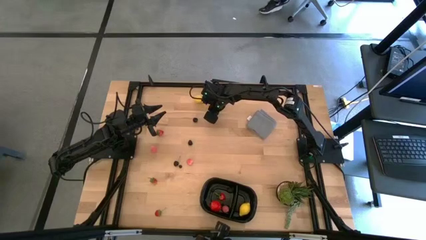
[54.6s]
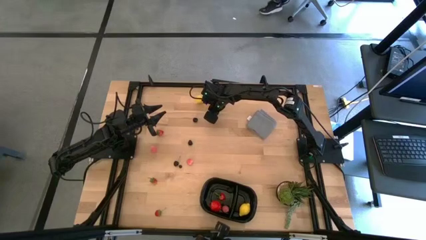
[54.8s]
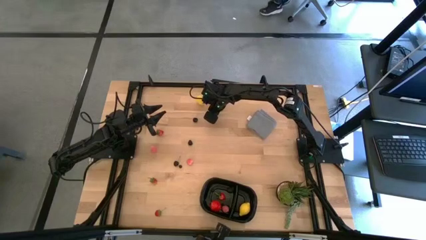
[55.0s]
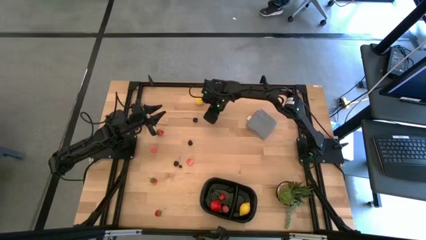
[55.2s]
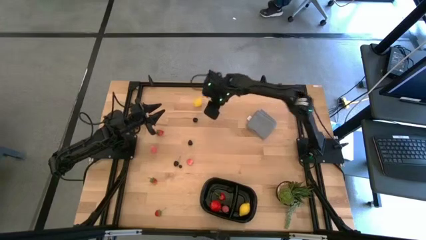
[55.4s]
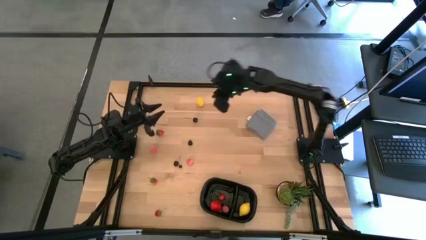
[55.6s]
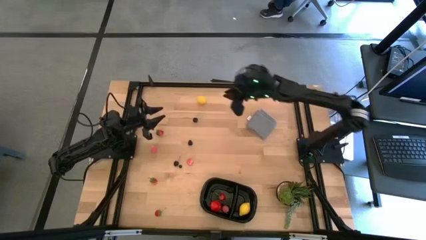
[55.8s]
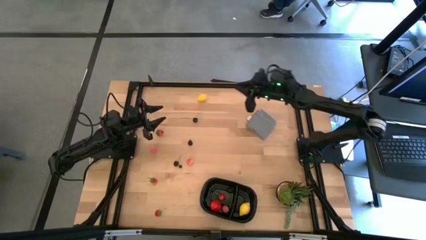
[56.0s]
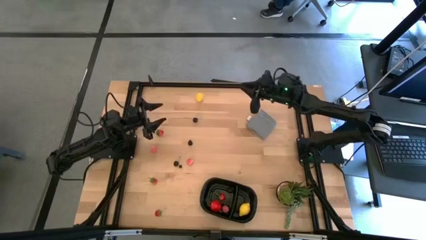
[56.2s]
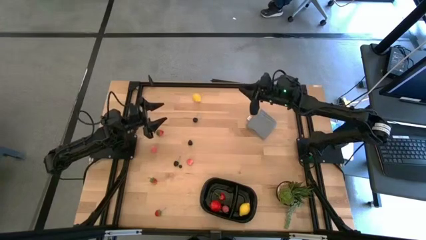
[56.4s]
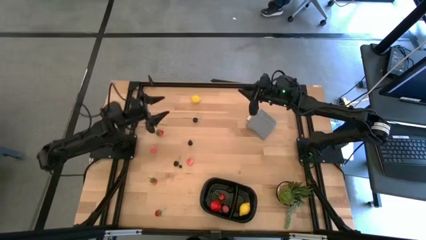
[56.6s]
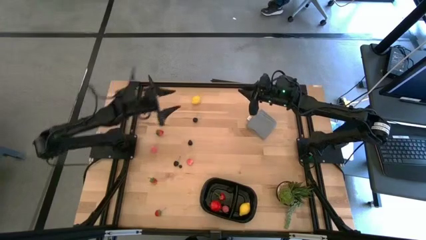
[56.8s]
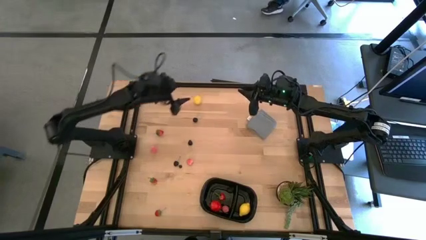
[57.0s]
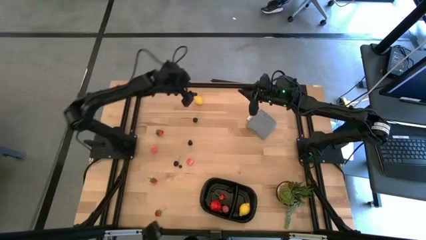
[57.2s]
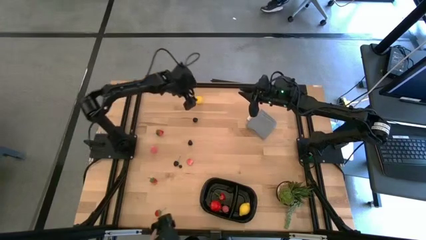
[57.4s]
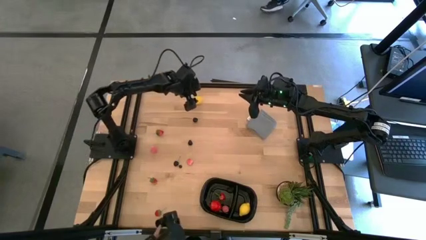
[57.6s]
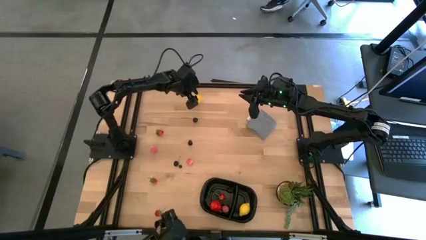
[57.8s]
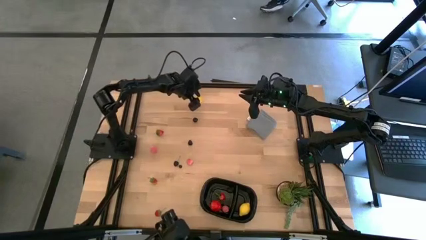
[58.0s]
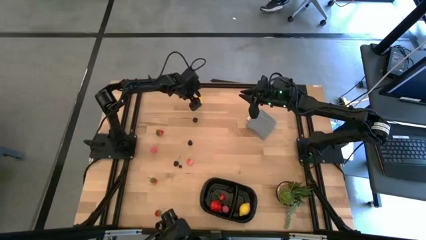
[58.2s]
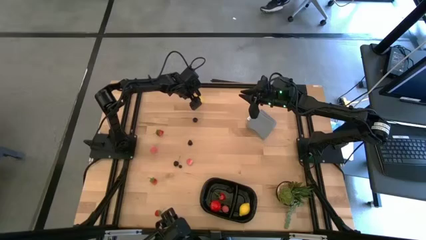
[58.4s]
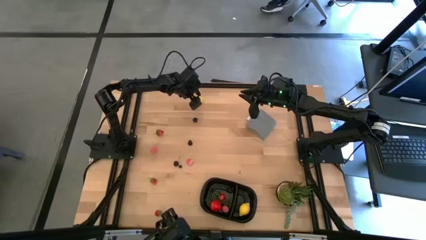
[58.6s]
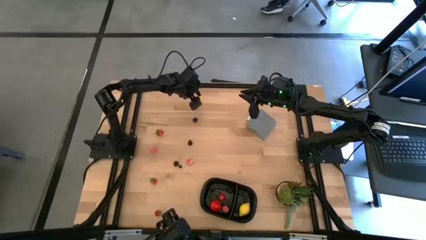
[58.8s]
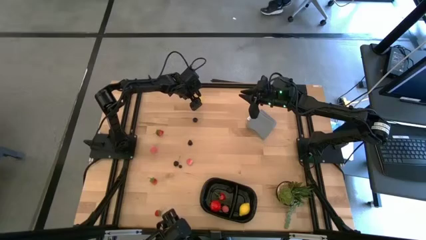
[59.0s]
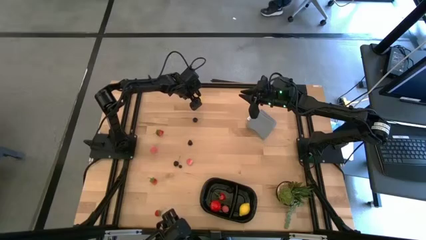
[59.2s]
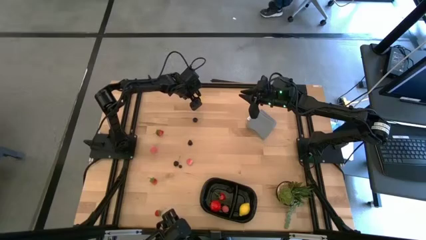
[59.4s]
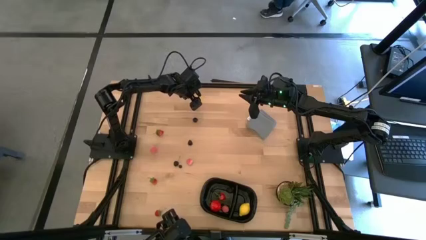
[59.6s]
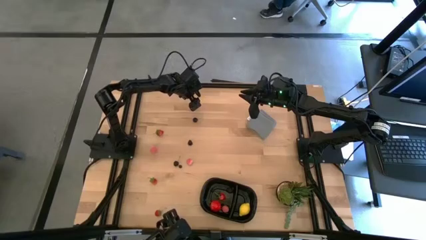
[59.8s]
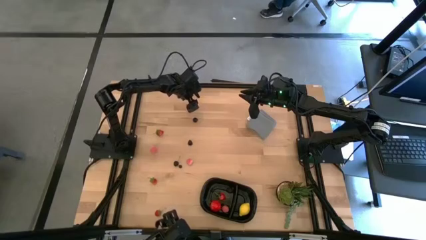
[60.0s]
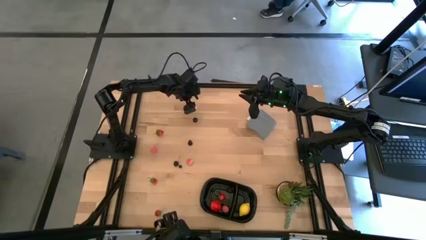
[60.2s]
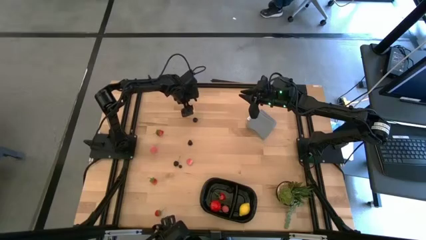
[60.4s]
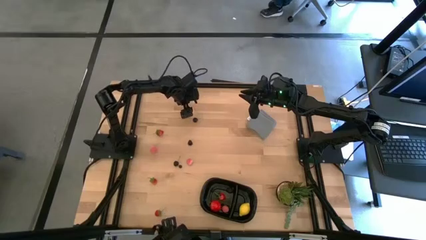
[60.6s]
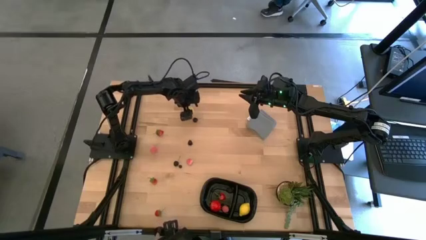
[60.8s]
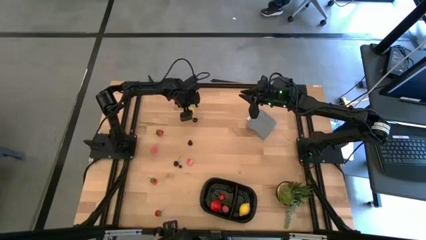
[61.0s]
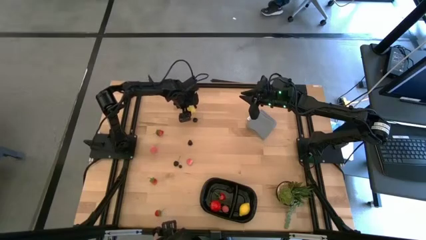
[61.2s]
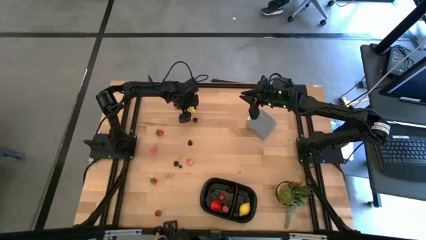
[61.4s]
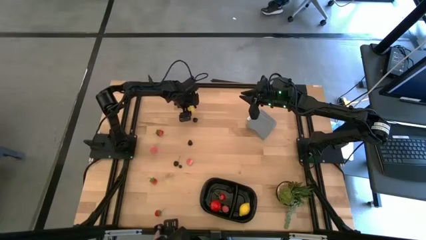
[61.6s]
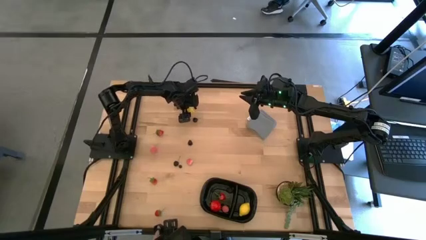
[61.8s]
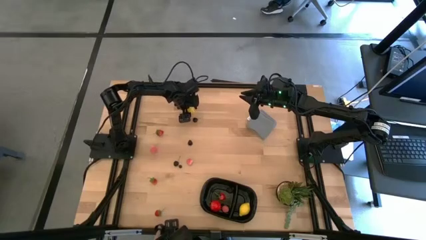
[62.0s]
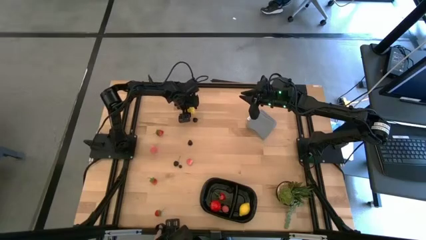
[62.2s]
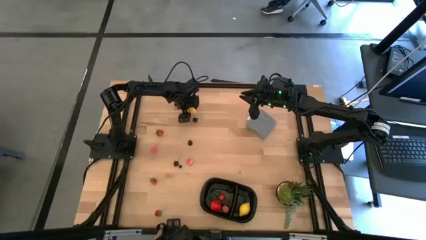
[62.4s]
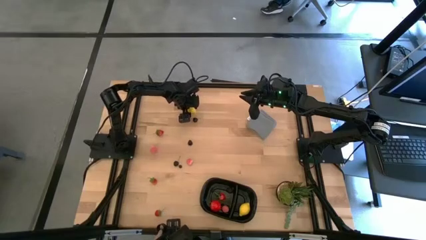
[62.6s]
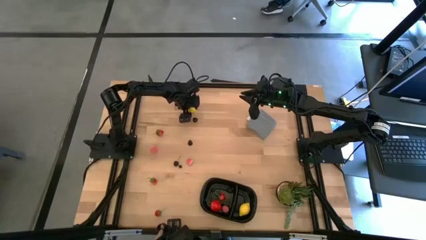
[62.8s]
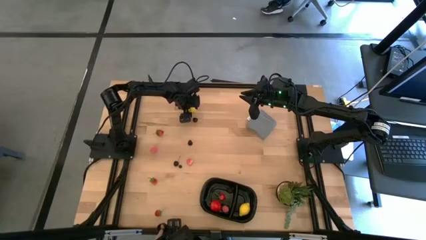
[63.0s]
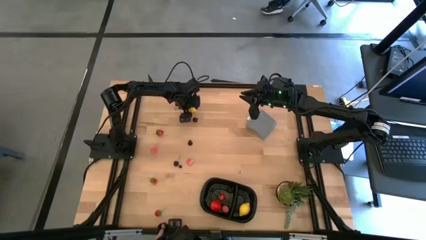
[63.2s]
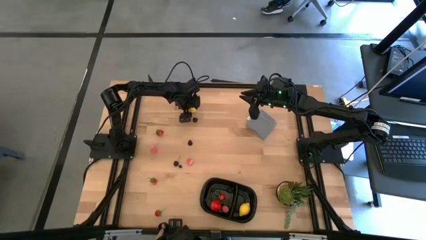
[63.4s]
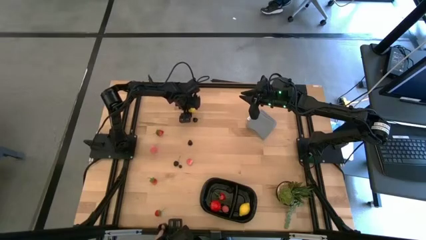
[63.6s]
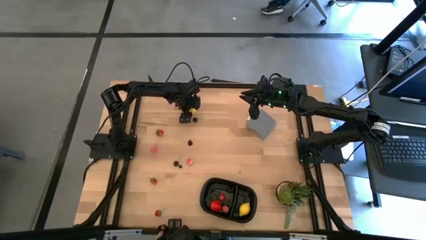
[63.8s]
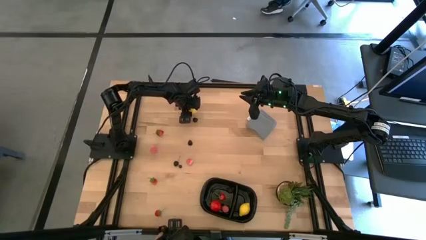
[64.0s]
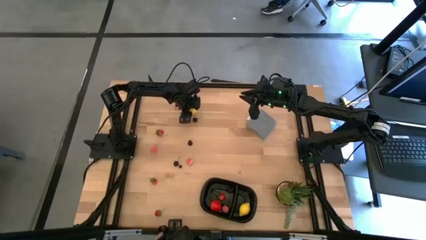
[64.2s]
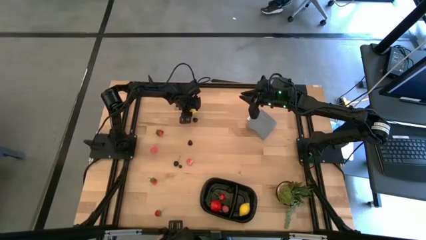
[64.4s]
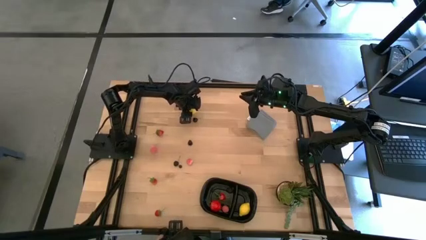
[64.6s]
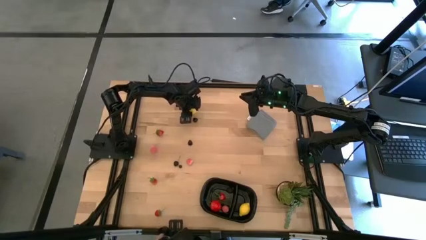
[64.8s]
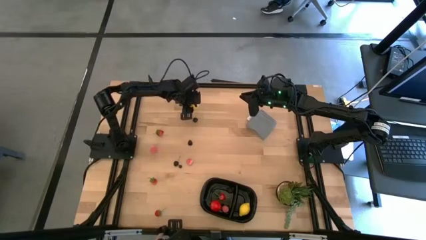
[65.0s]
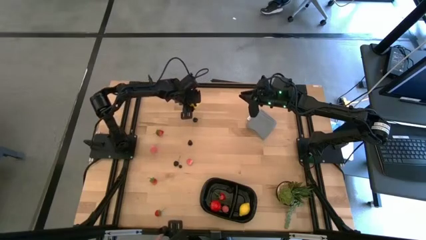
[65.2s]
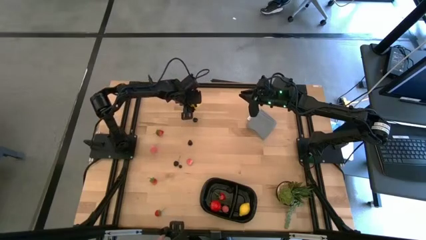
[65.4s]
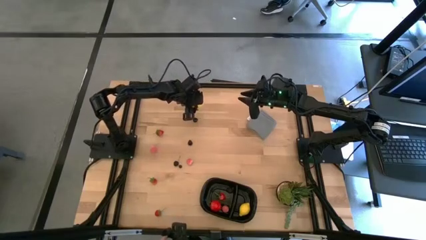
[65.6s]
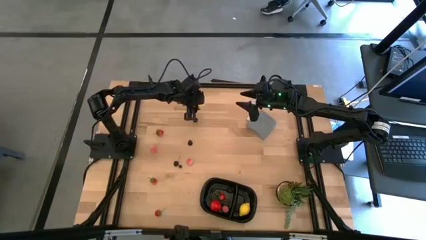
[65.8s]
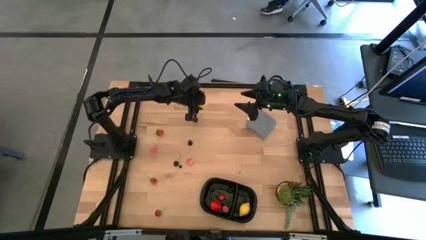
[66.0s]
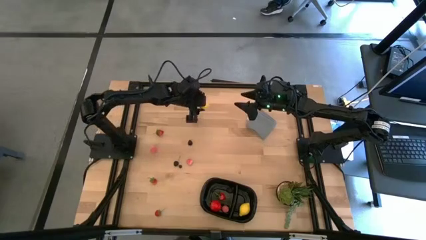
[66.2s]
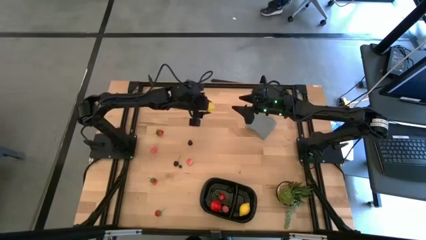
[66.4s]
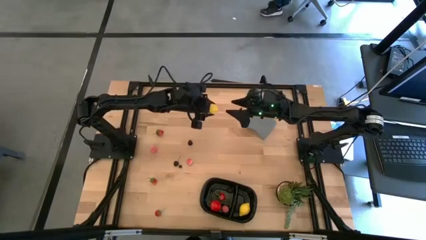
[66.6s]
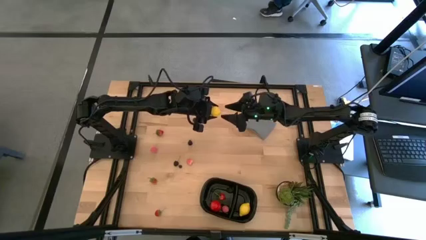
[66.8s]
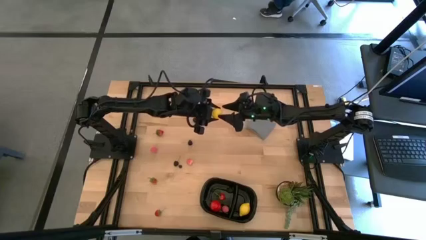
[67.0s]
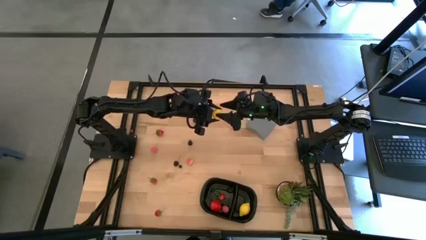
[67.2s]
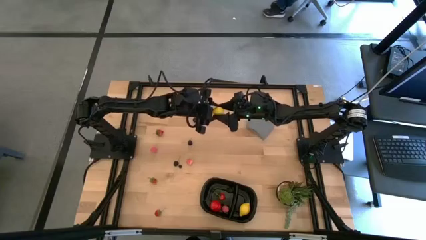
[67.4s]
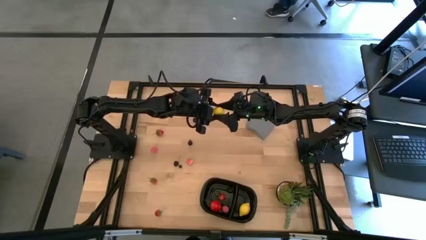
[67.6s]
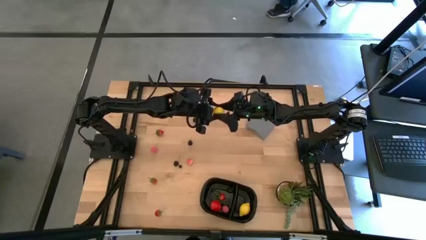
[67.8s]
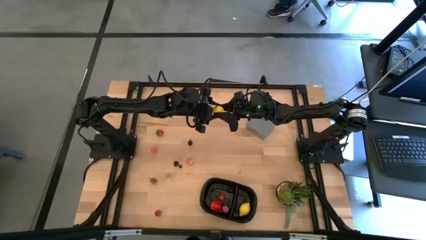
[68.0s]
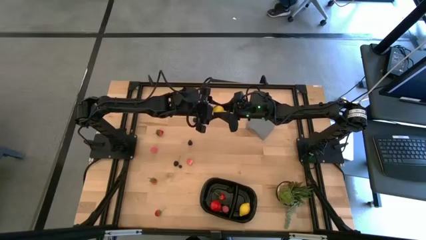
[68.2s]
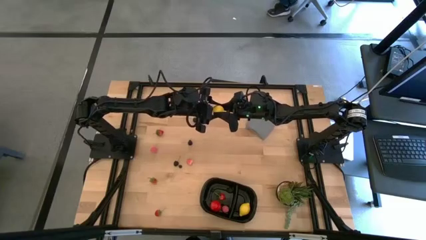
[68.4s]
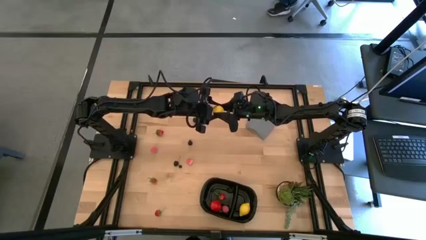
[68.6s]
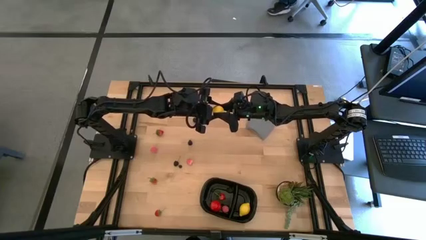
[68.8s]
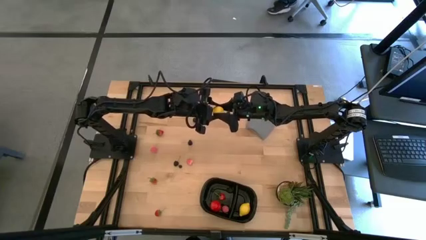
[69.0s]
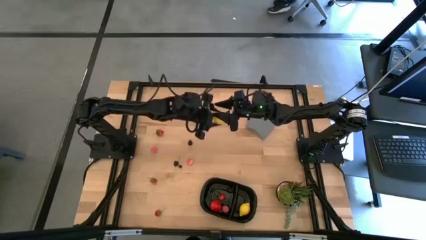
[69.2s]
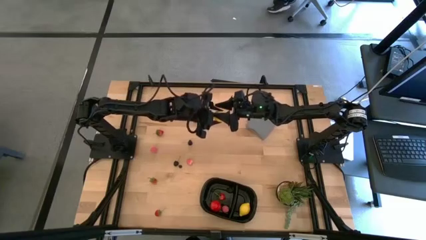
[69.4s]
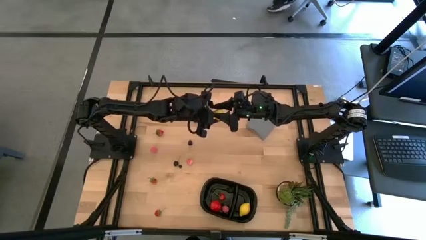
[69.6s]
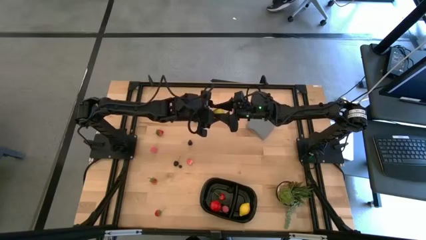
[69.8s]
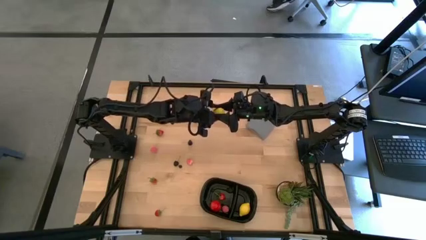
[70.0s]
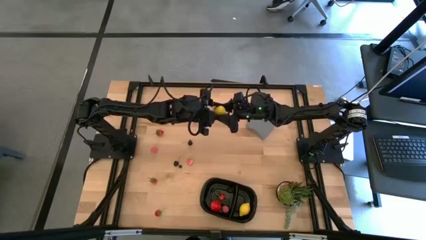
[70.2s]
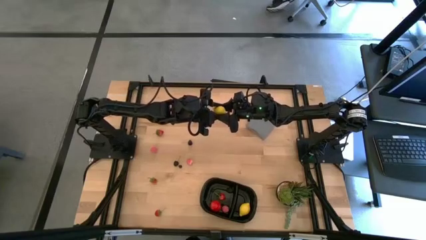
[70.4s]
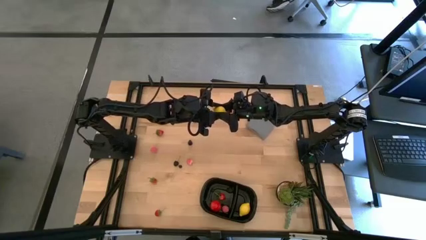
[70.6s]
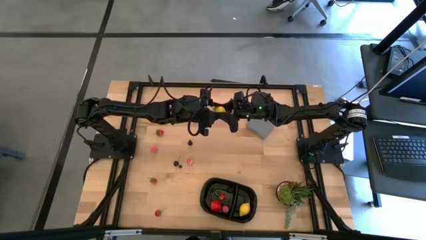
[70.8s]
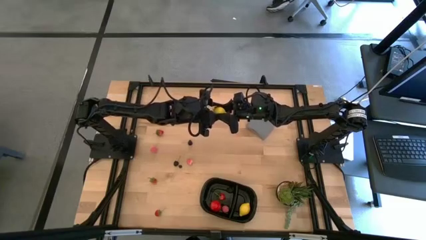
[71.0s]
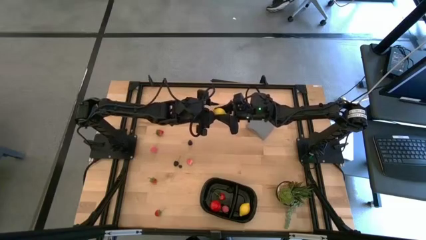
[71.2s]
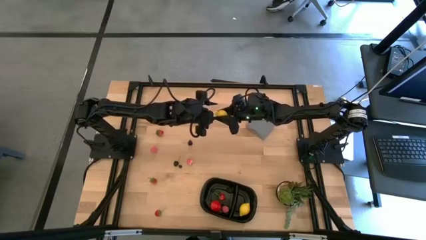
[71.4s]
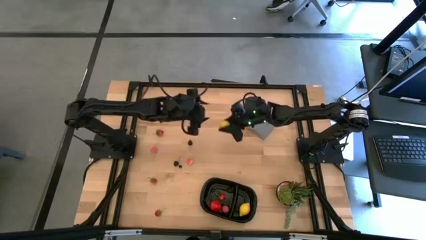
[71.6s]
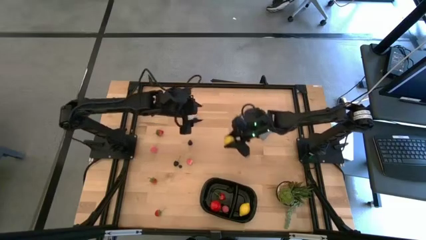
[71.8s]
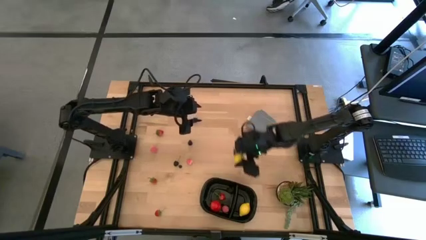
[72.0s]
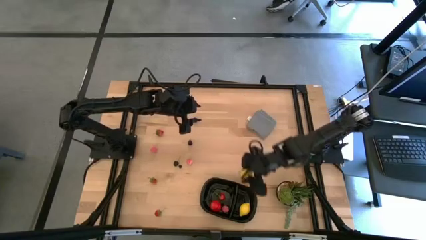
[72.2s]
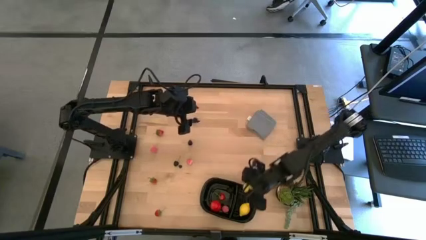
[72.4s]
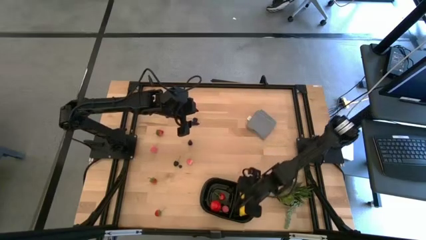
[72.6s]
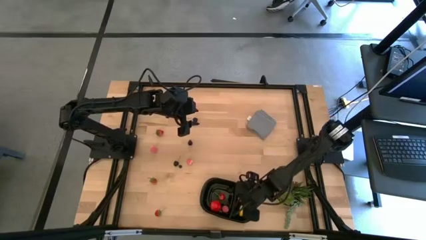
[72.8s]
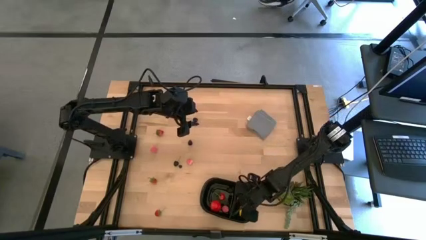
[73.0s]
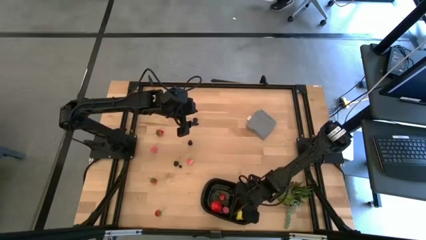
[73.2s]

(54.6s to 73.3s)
Task: Pick and placing Produce into tupperware
Put the lemon into the black bin
